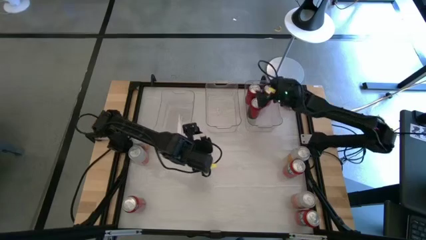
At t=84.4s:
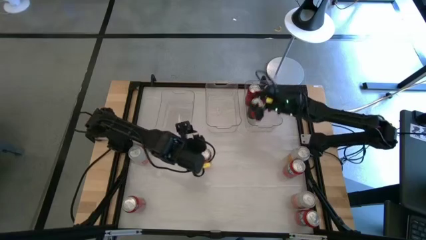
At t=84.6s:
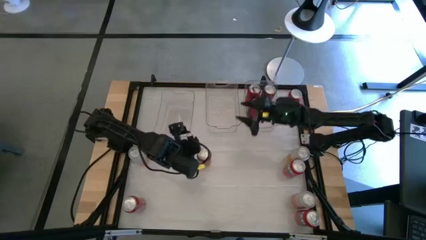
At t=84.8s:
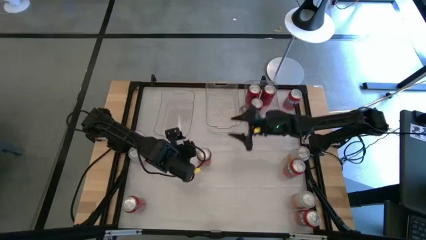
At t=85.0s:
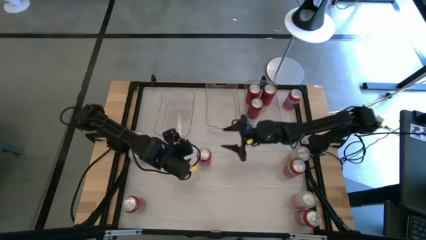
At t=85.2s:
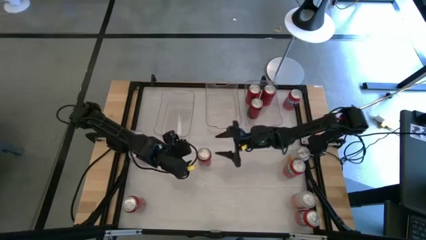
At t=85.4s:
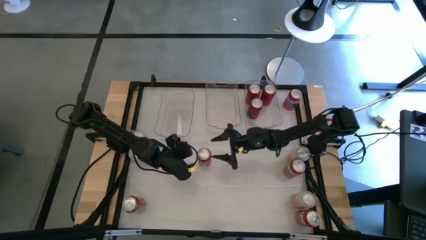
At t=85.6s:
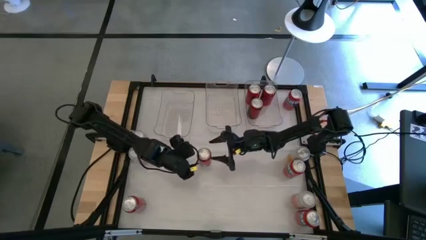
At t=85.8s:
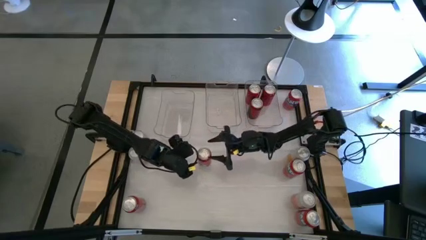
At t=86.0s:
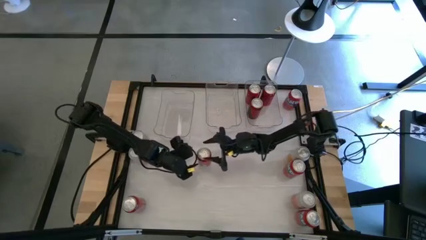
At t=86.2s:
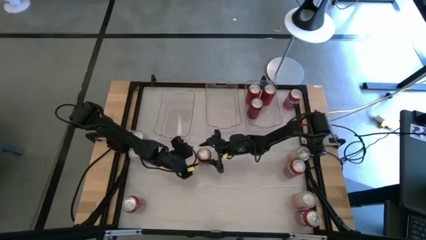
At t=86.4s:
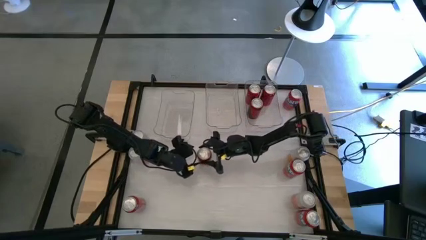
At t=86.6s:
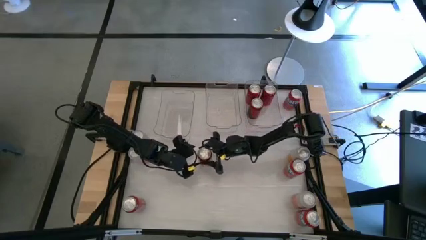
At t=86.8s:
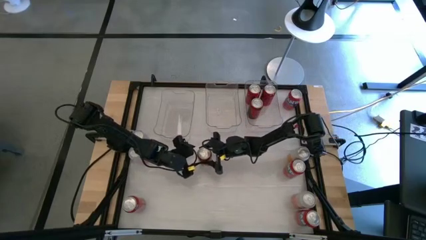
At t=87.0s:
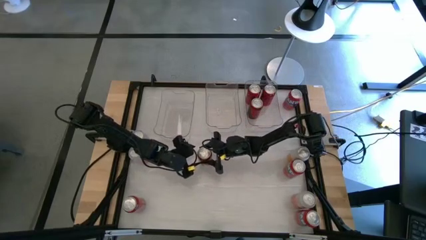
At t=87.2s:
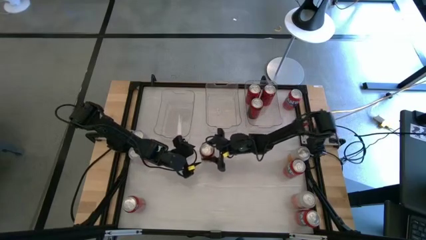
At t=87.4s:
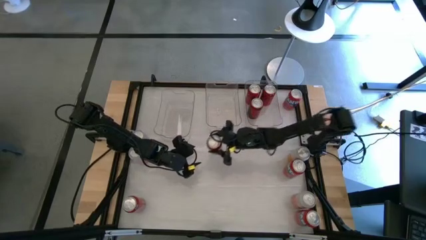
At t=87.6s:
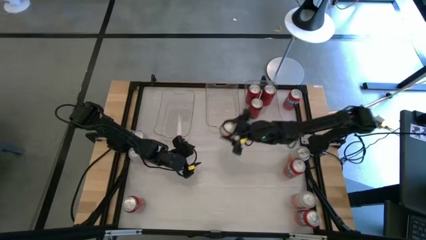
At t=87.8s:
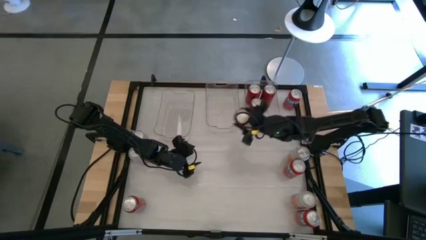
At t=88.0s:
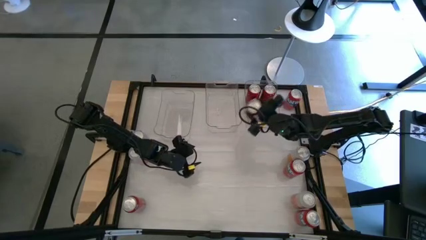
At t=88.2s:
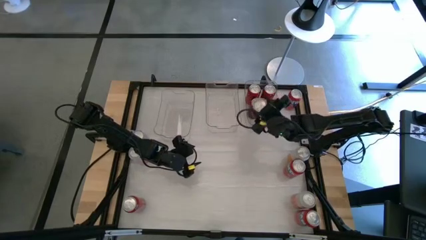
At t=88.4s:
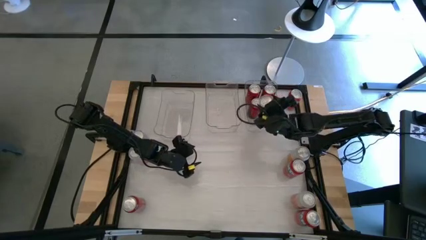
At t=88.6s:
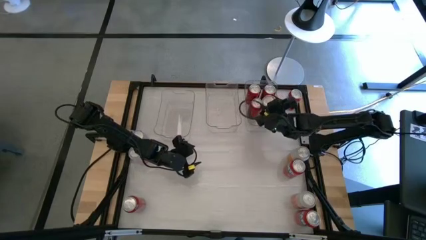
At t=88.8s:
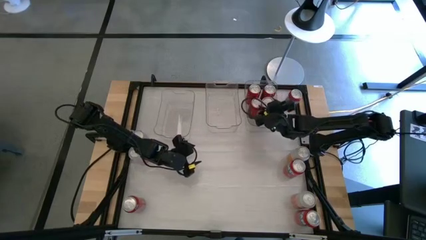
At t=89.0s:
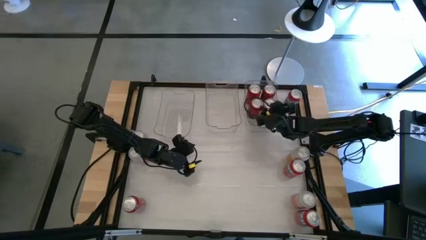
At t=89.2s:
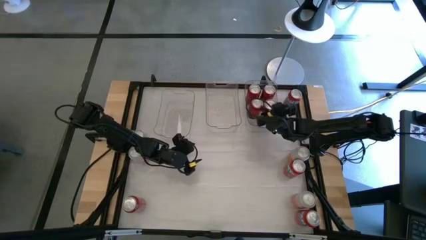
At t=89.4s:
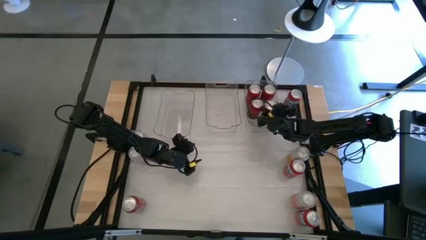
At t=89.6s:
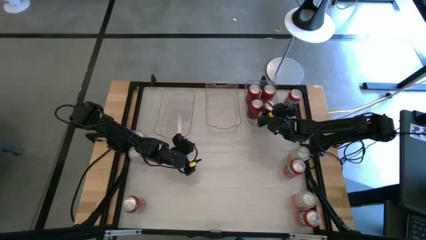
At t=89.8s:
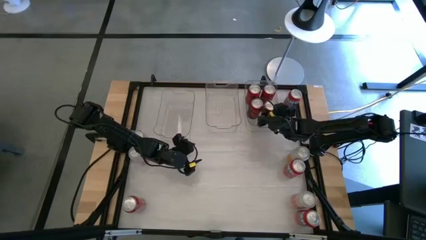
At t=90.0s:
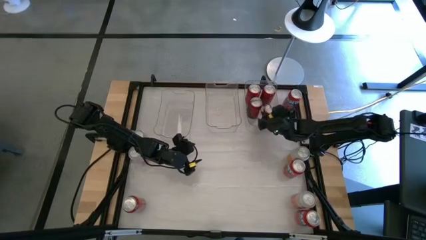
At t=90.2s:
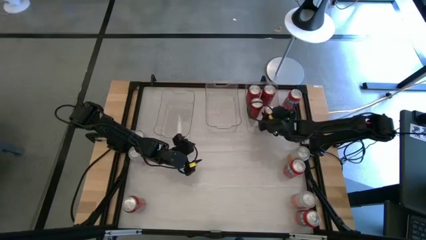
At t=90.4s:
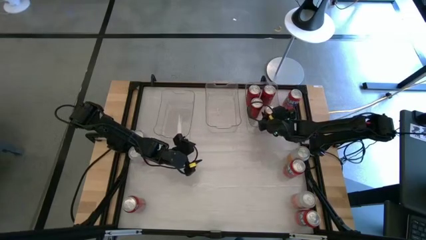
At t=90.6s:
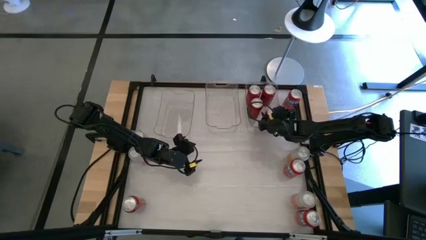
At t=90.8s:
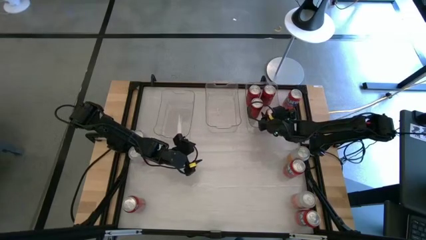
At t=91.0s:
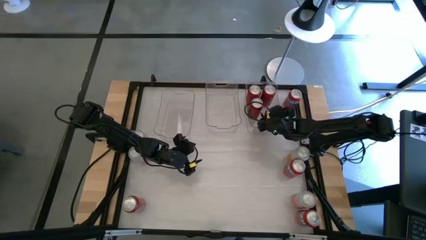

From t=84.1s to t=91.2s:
Task: Sort soda cans
Put the red black soda can into the right transparent bin

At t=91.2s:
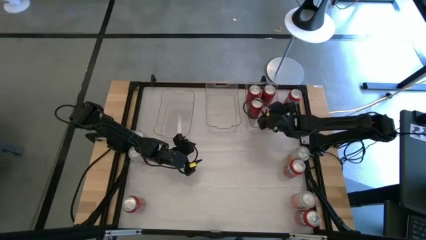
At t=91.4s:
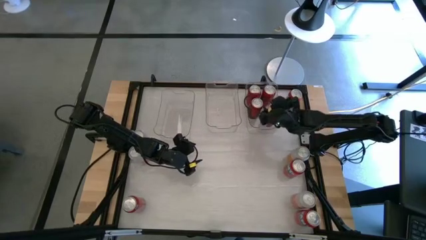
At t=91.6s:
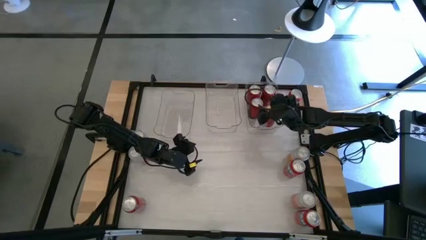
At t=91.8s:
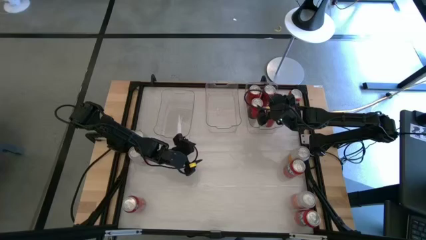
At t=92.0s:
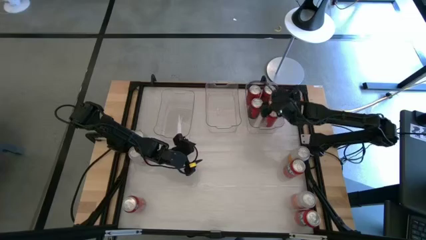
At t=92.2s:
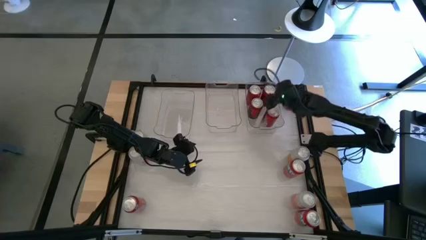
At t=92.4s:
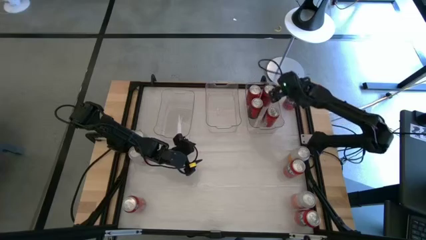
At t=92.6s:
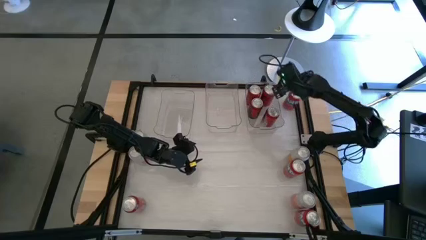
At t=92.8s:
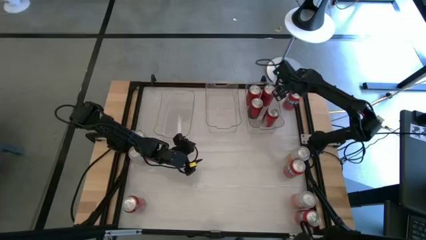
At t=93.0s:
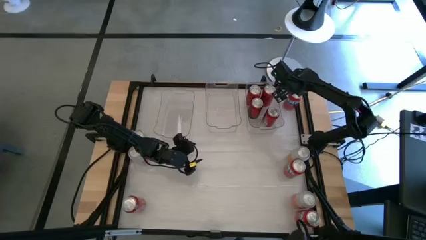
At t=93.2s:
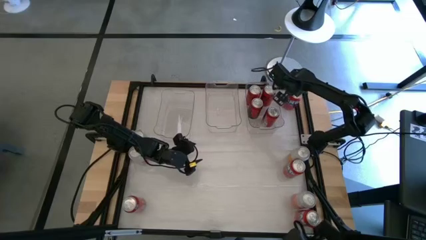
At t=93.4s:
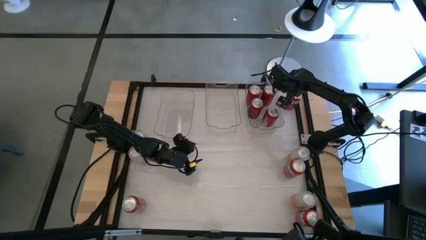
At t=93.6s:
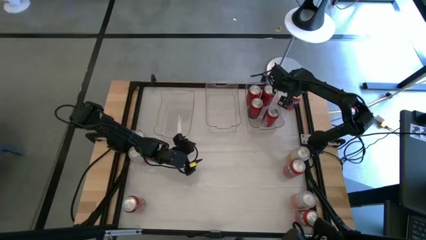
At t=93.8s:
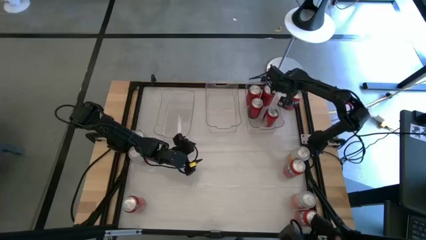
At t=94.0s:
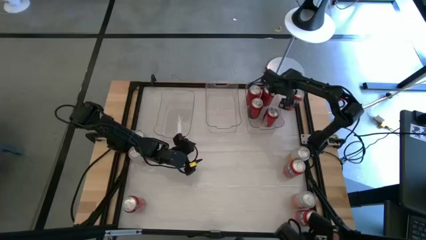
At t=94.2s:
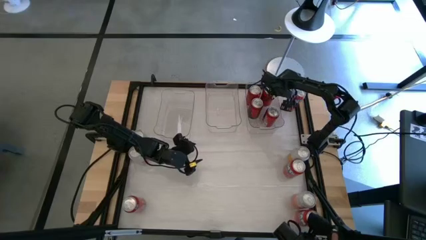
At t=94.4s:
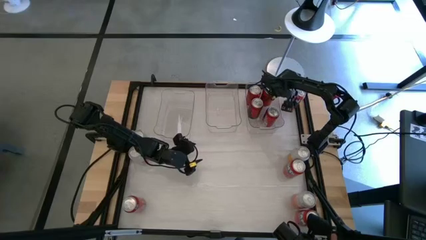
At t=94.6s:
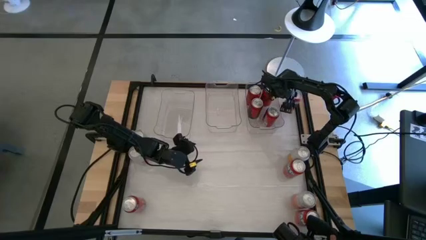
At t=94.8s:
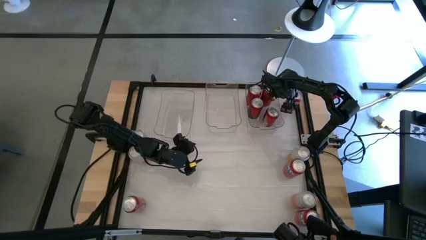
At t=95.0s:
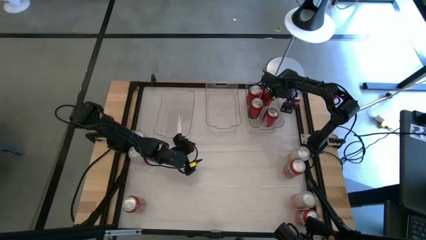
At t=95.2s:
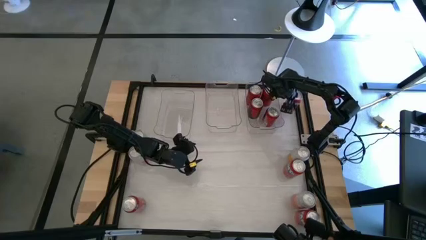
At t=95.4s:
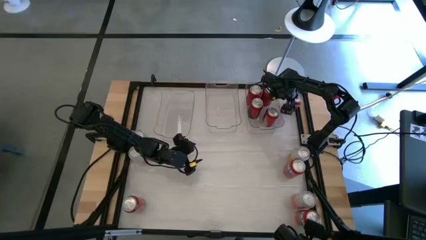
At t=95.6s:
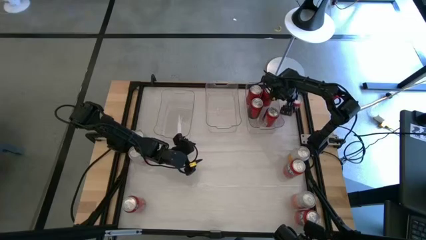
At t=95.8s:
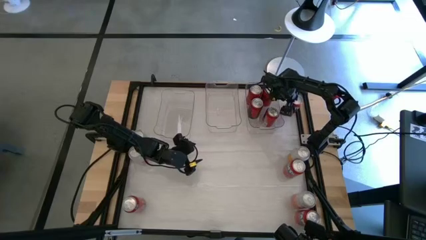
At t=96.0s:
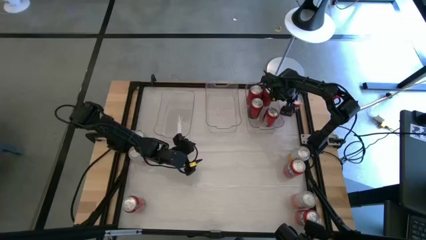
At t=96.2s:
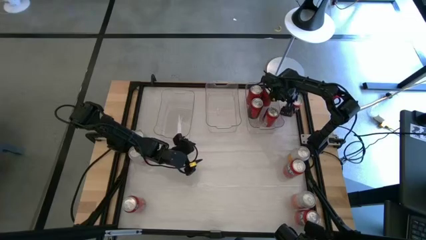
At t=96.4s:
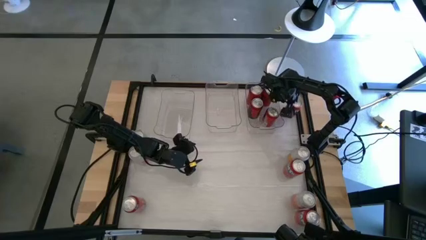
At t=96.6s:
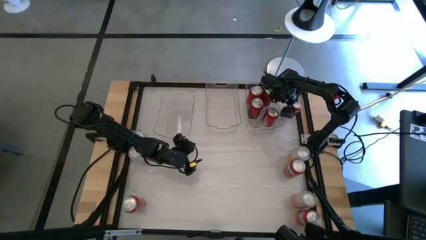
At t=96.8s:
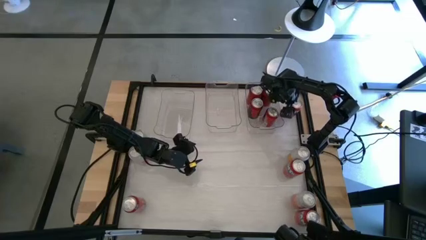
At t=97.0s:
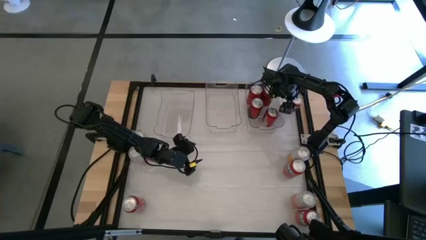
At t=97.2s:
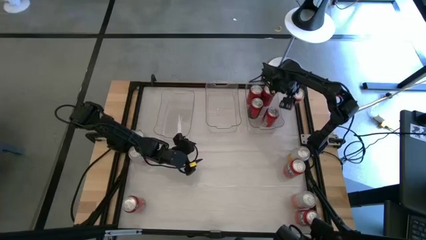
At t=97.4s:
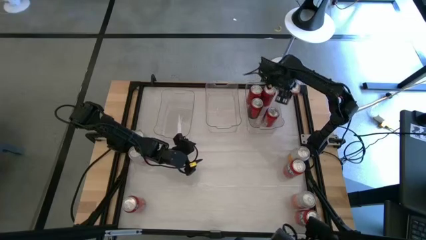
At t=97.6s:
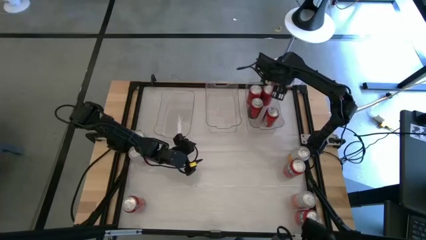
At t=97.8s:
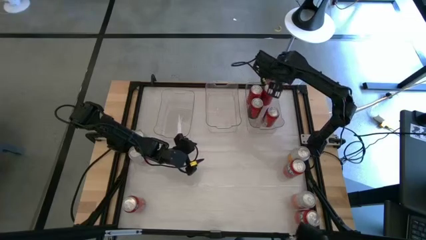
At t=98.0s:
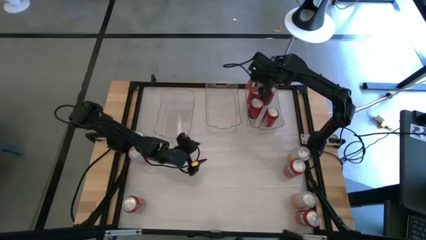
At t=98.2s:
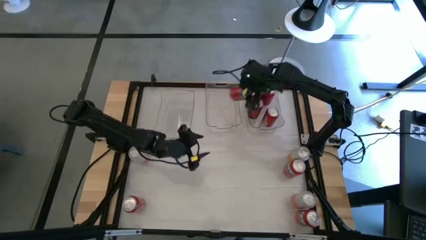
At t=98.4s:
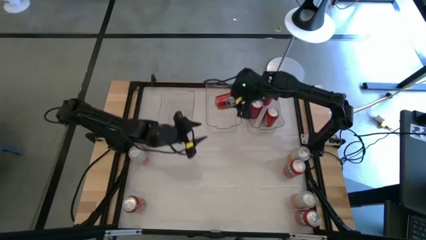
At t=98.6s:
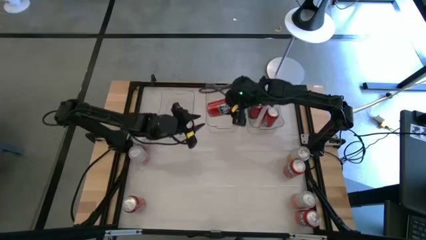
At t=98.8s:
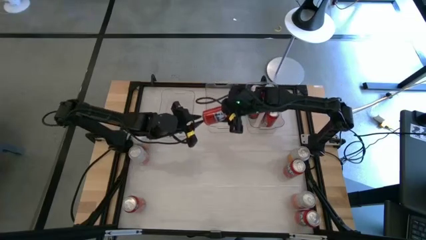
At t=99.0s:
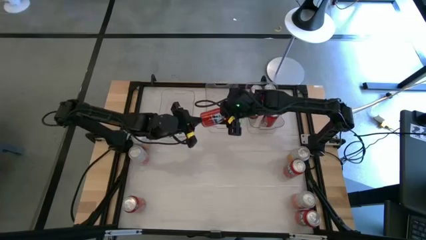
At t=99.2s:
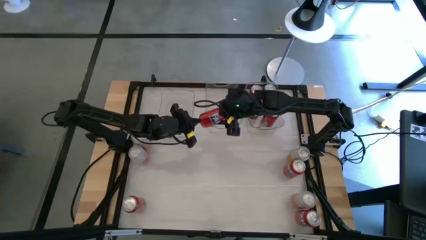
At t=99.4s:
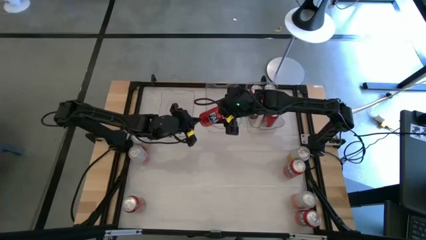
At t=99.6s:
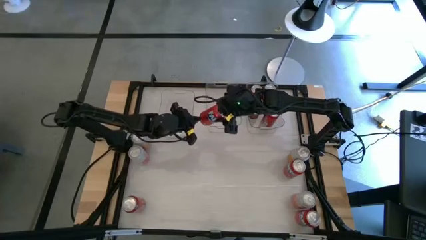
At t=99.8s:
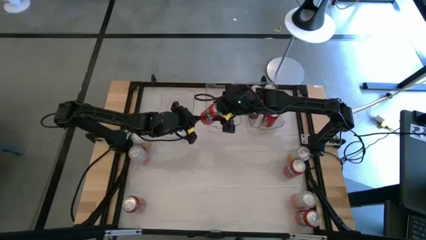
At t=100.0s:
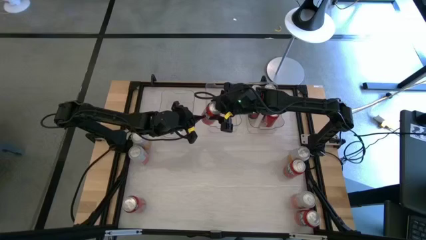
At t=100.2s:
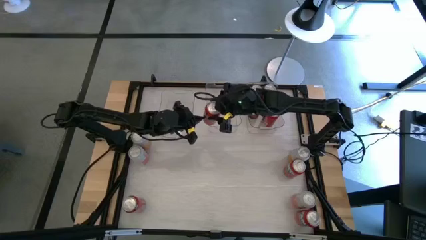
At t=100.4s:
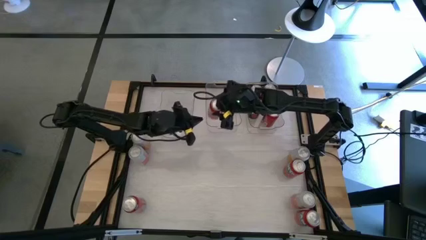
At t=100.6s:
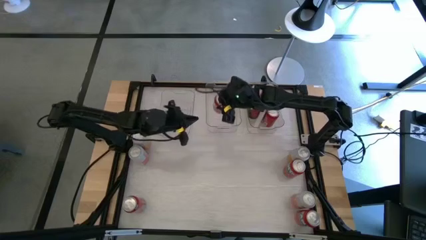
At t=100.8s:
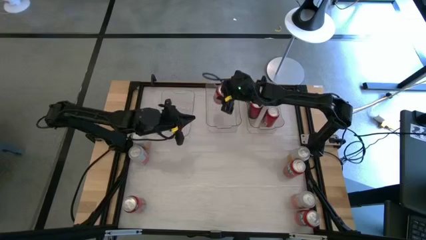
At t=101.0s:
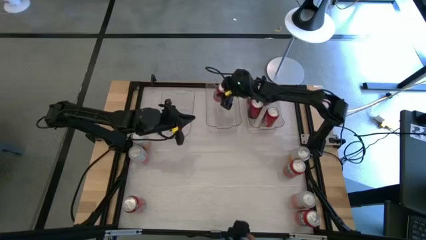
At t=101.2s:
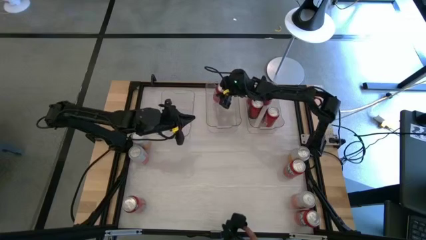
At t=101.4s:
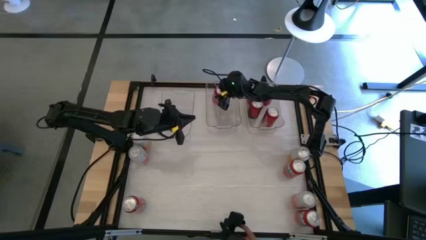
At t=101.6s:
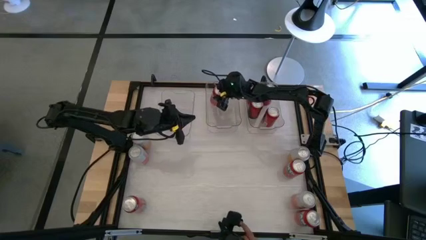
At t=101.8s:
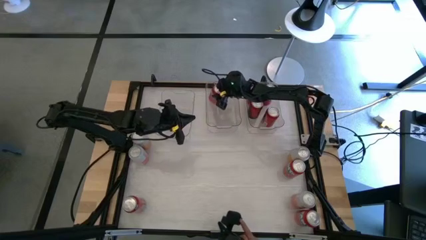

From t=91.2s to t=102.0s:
Put the top right red soda can into the middle transparent bin
